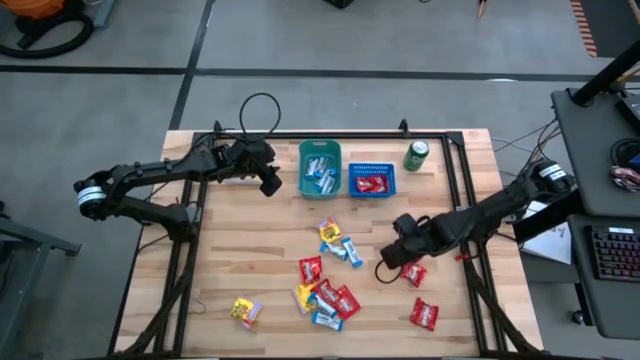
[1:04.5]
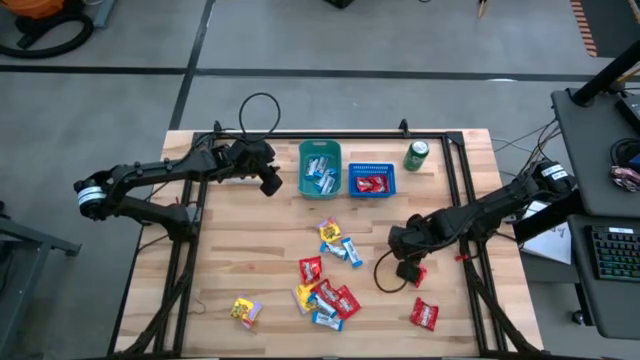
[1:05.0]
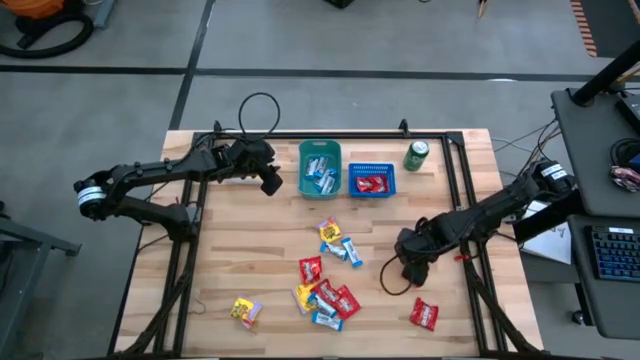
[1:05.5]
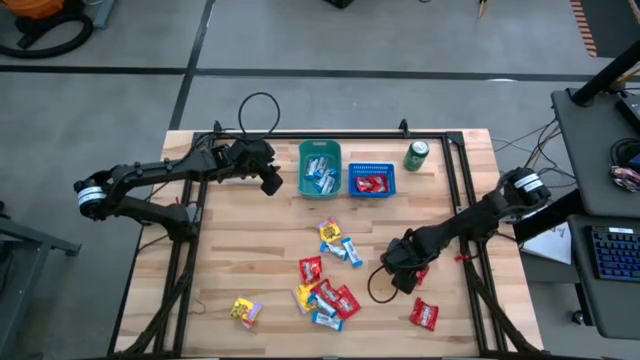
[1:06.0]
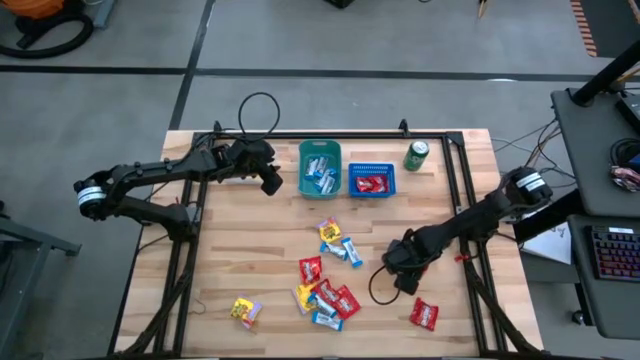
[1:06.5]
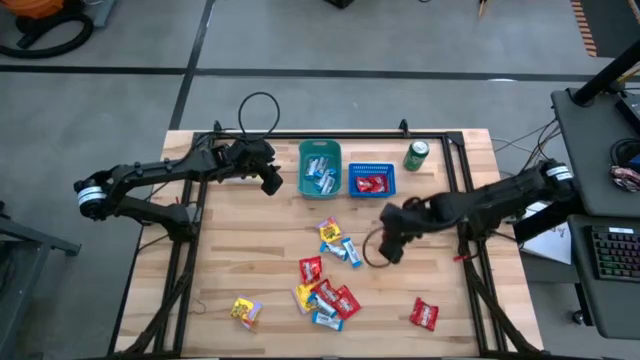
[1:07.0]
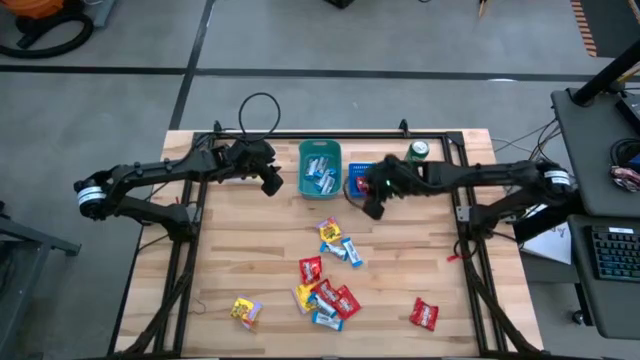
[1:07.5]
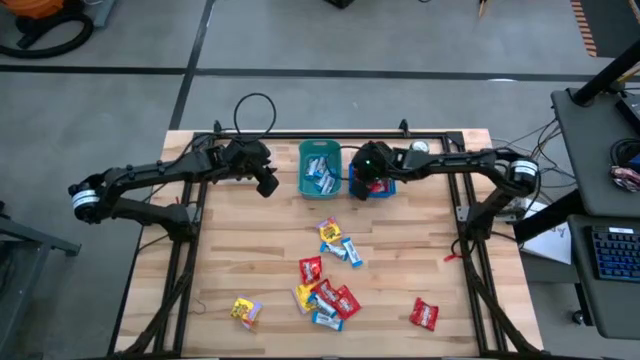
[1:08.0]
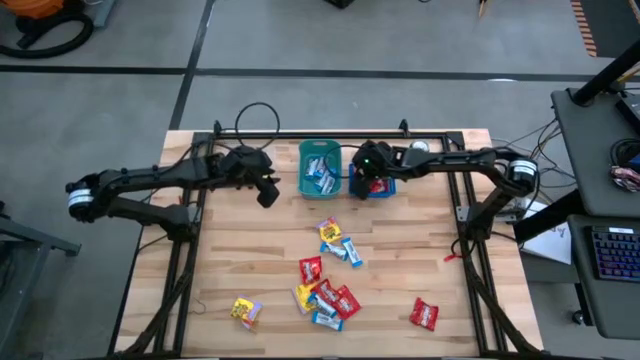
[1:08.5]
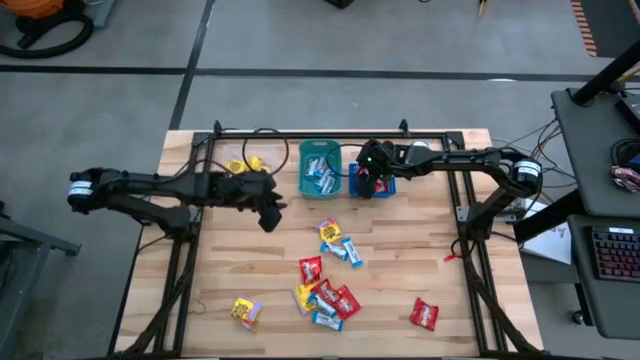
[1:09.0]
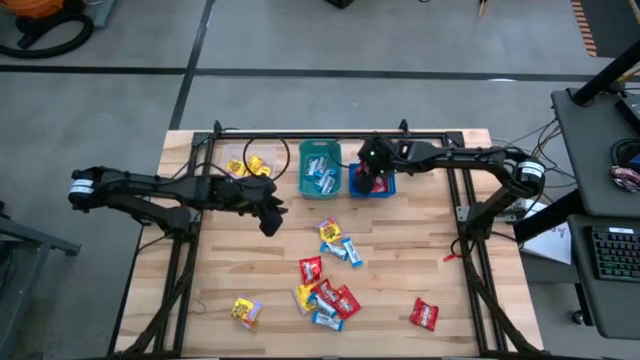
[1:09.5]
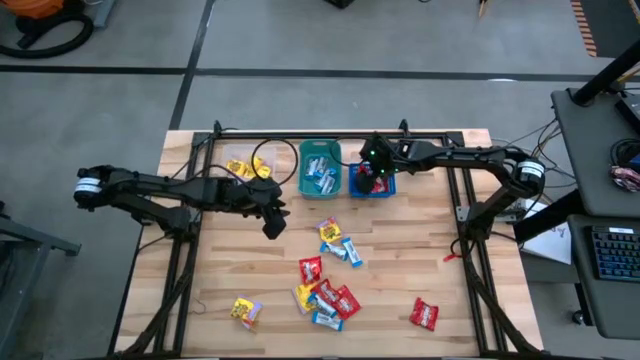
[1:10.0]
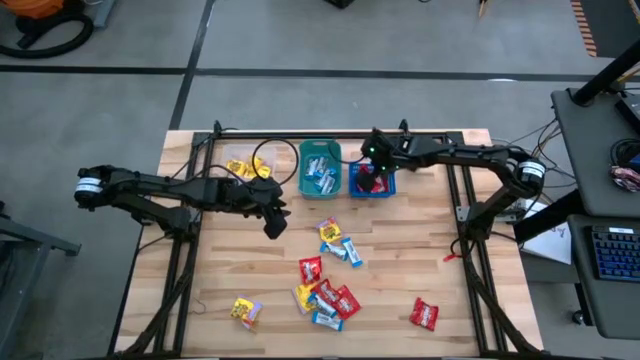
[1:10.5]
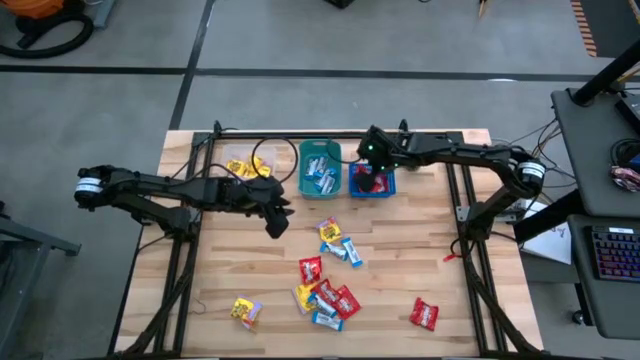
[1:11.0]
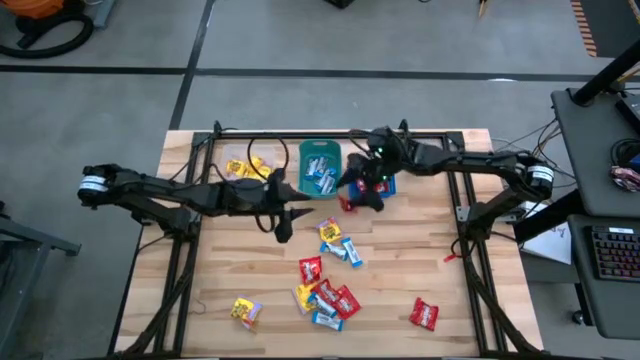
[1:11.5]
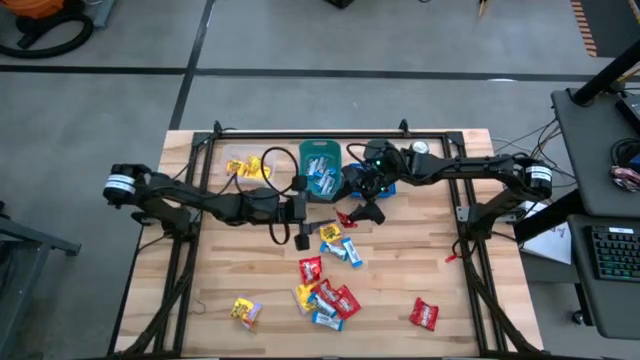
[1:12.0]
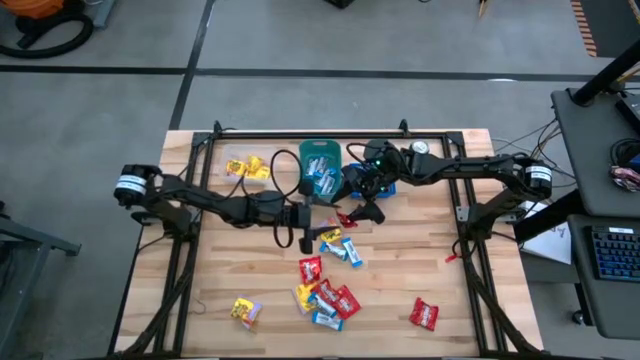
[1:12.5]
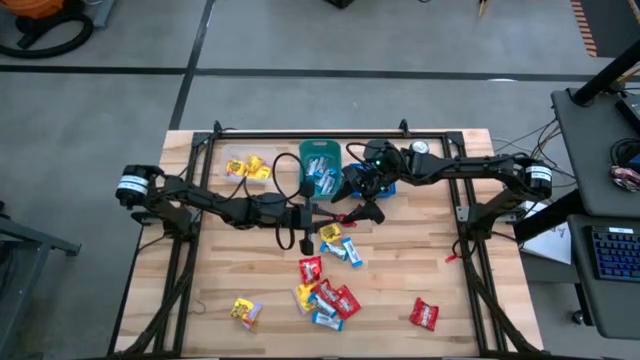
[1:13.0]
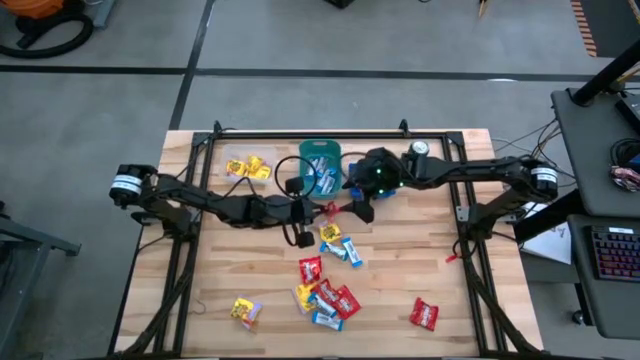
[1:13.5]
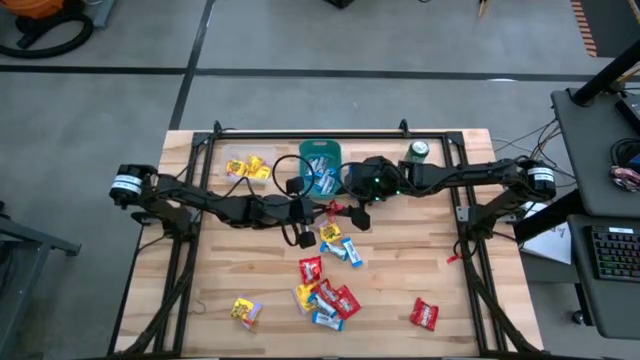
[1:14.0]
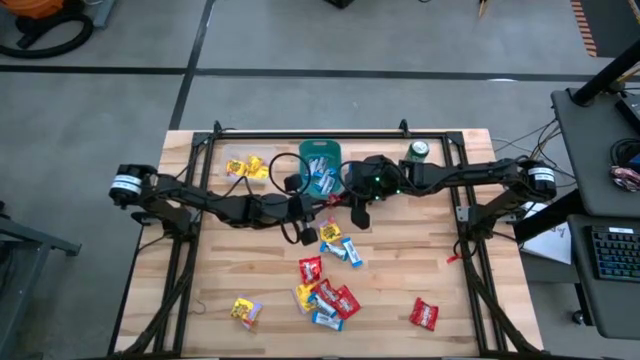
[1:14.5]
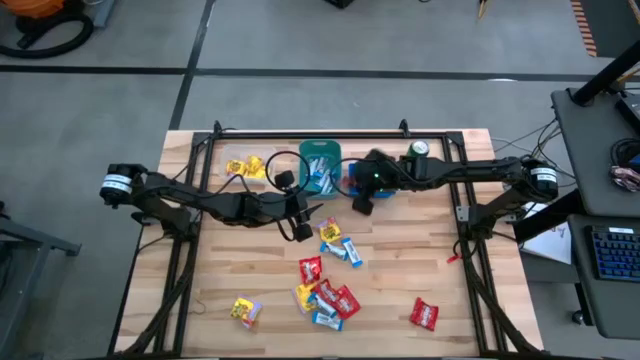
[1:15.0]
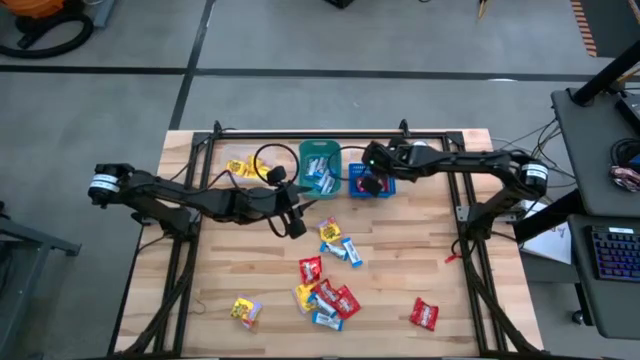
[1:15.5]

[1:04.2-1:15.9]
Task: Sort candy
Put the red candy into the blue bin

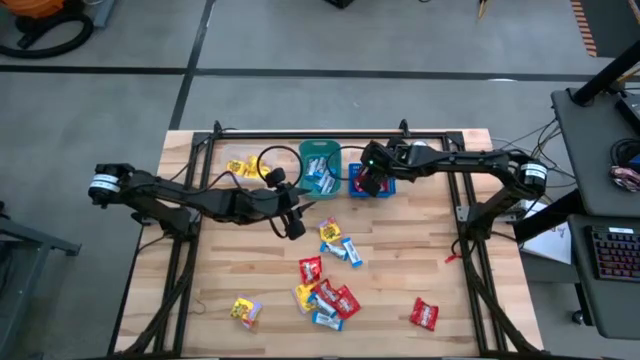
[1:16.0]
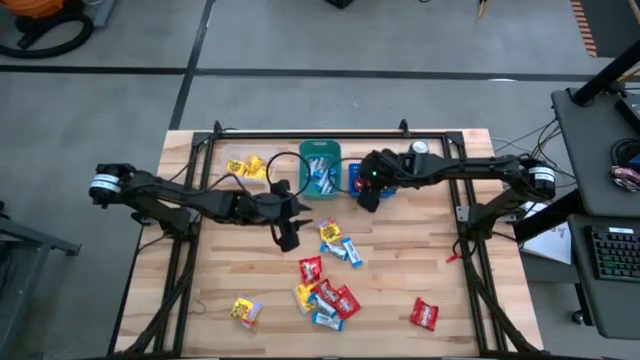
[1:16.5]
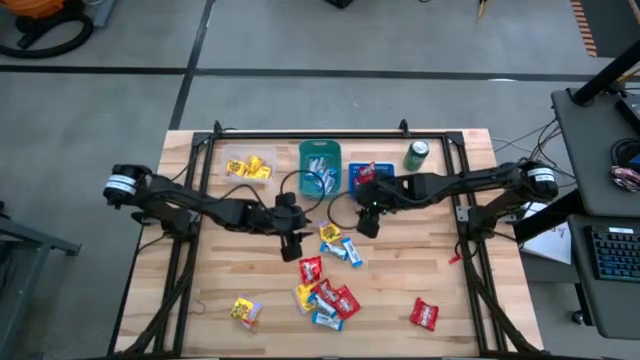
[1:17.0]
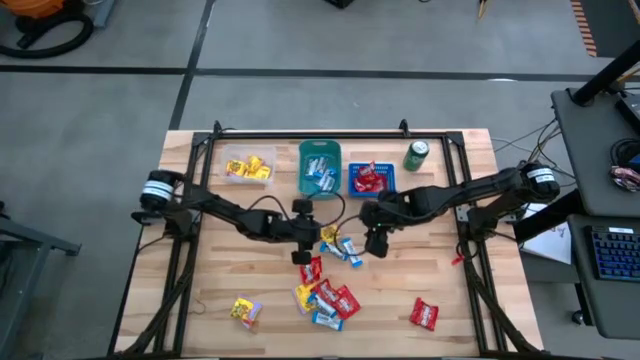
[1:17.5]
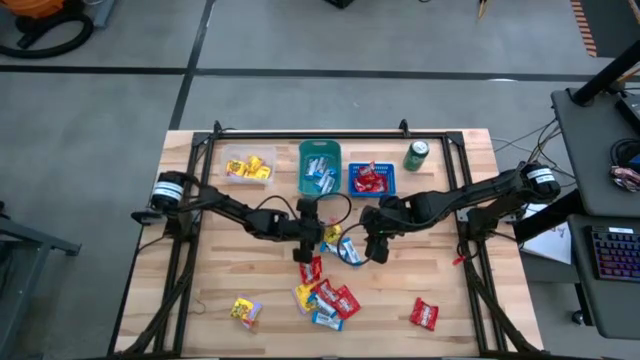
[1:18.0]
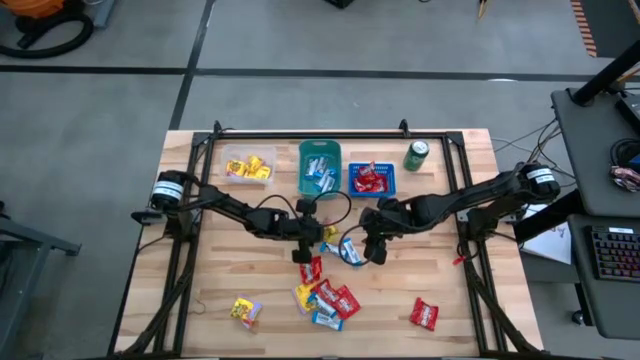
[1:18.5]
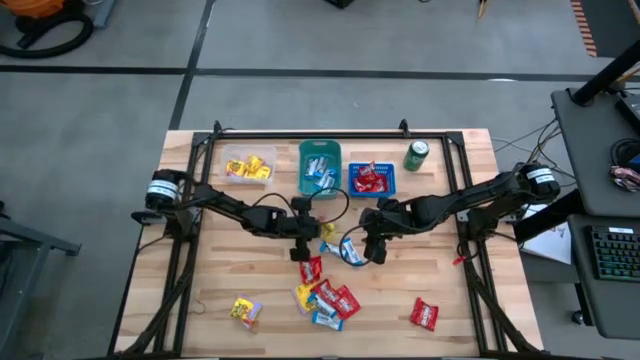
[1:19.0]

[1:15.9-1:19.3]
Put the yellow candy into the transparent bin

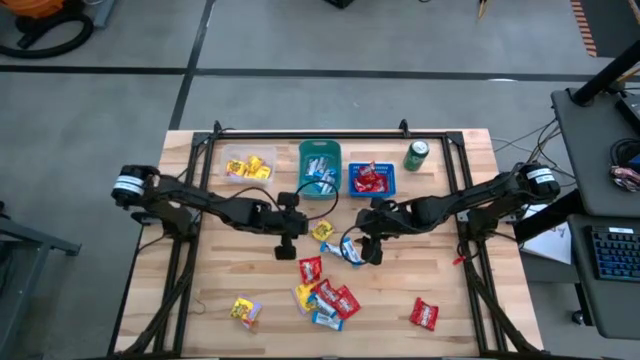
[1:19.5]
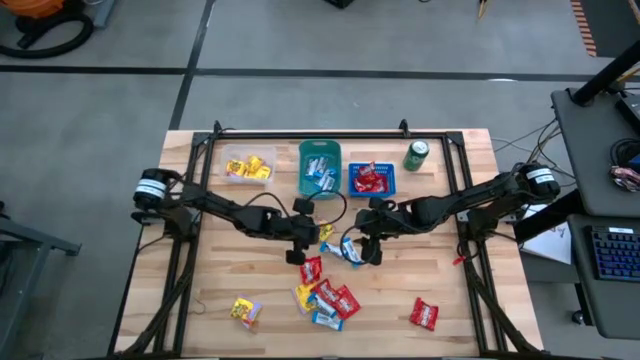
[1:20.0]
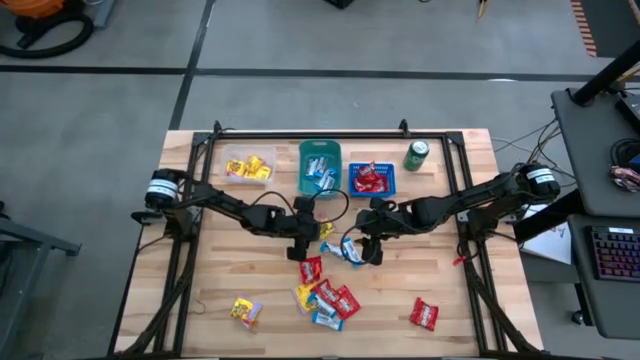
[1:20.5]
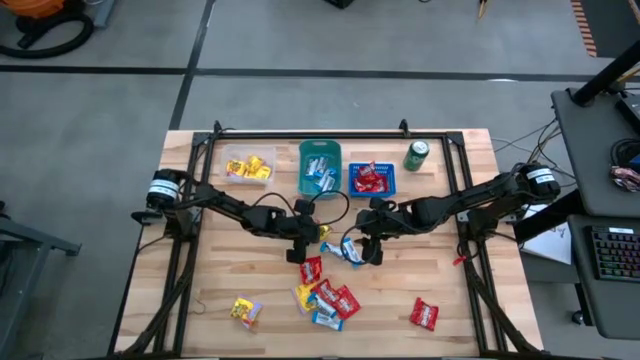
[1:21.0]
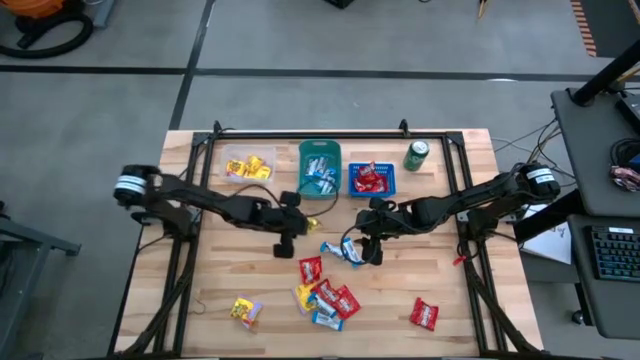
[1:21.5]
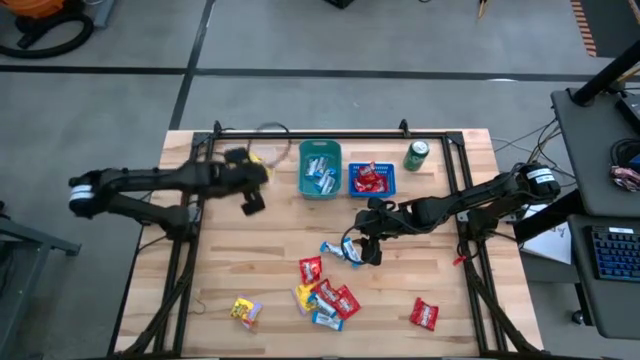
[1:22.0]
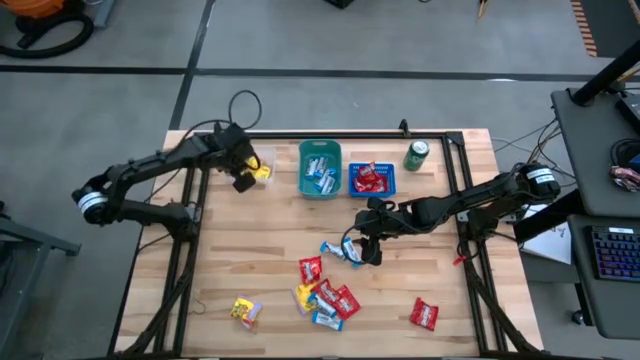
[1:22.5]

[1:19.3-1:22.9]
Put the yellow candy into the transparent bin

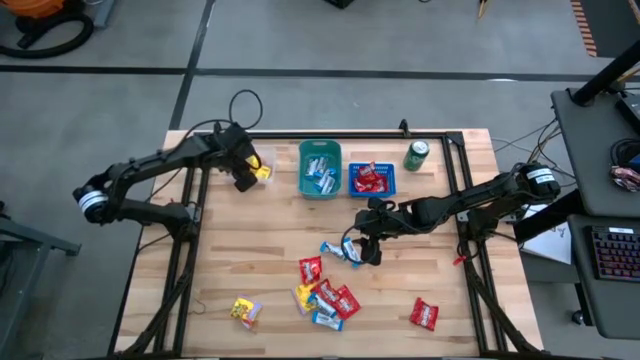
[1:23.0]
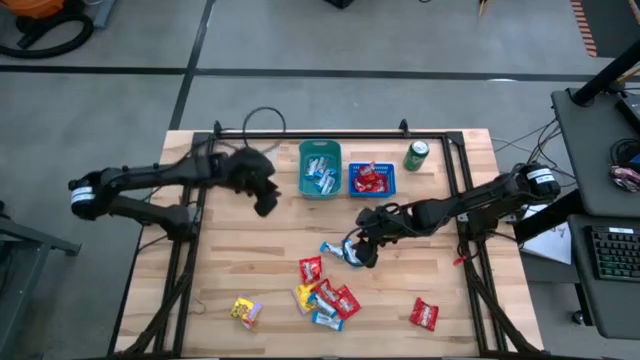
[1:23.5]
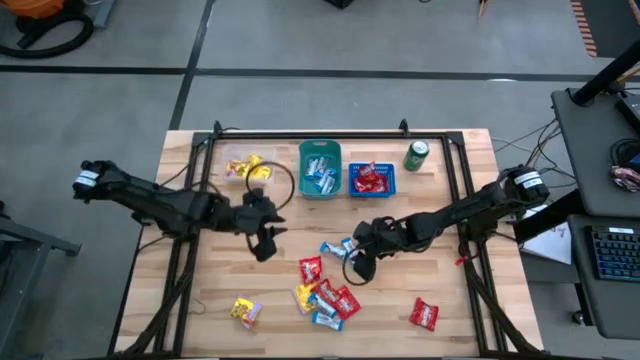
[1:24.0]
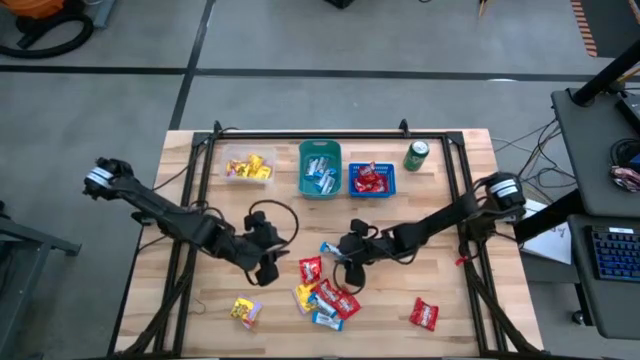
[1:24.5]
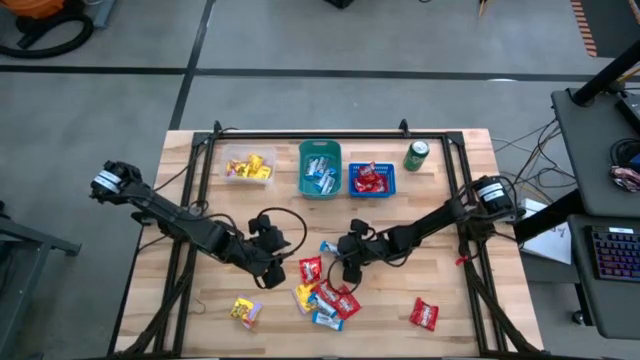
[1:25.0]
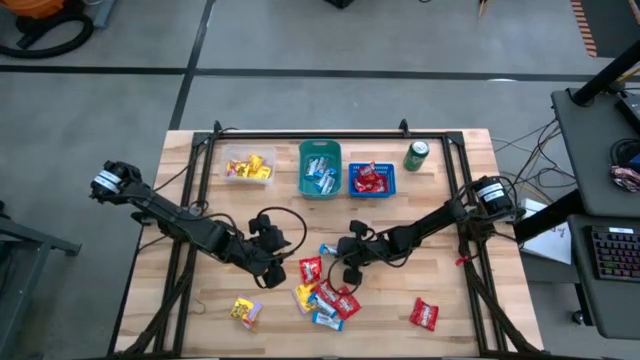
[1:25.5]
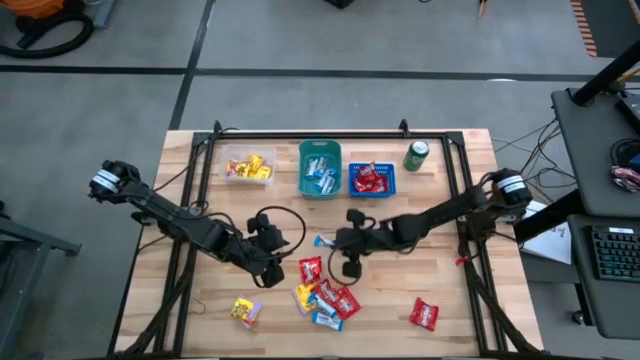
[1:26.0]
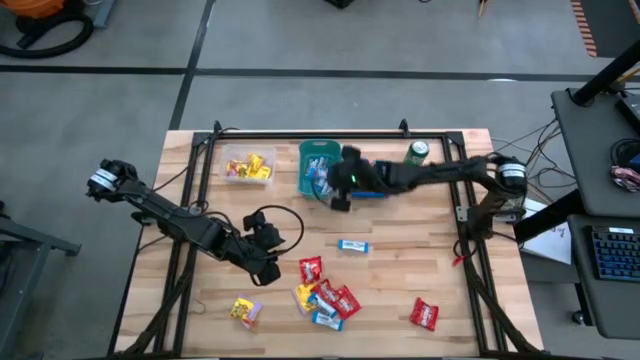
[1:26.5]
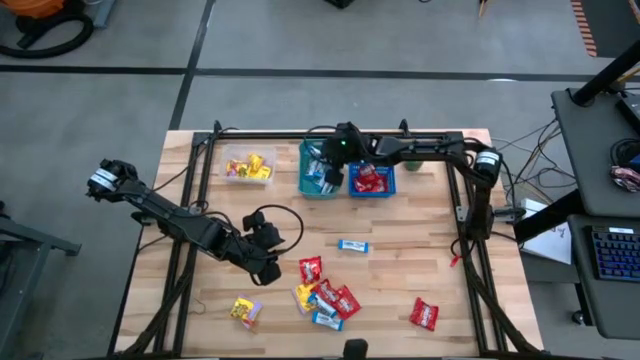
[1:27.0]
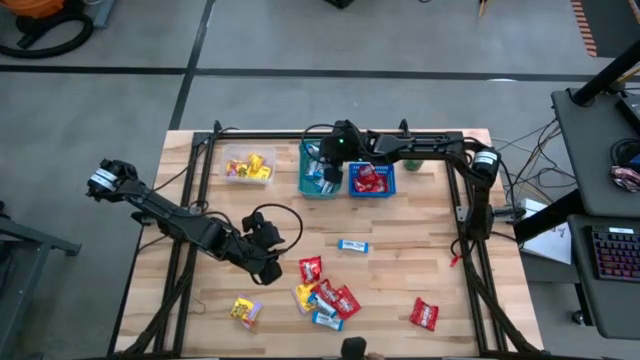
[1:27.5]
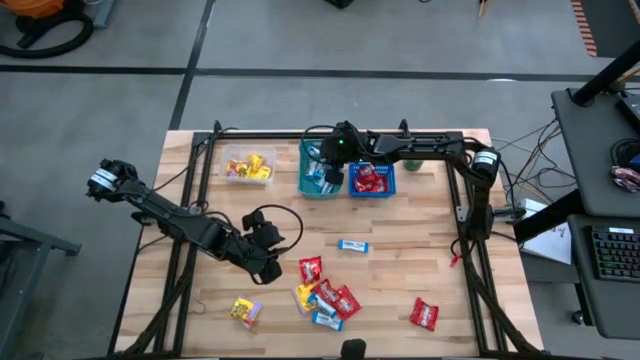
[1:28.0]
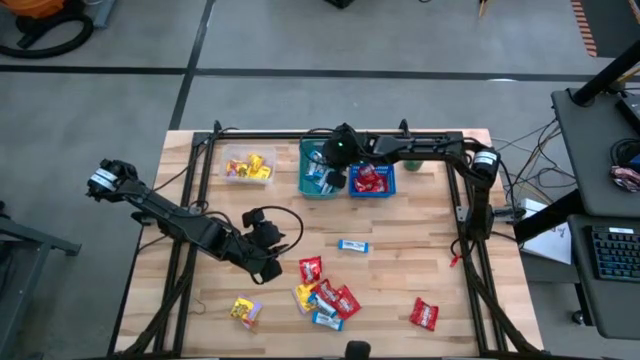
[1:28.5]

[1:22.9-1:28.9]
Put the white chocolate into the green bin
